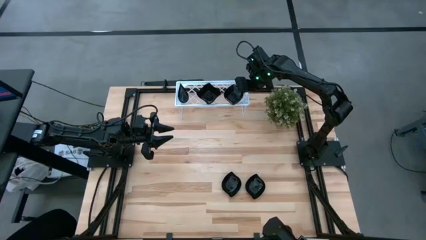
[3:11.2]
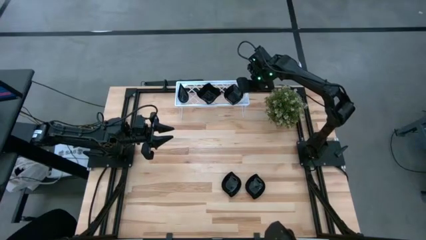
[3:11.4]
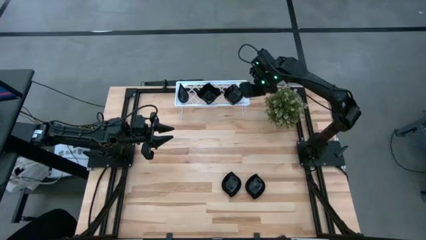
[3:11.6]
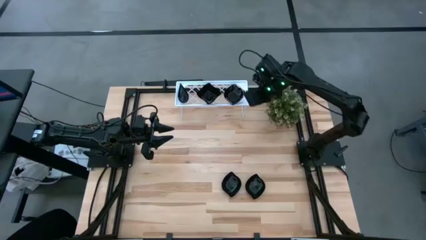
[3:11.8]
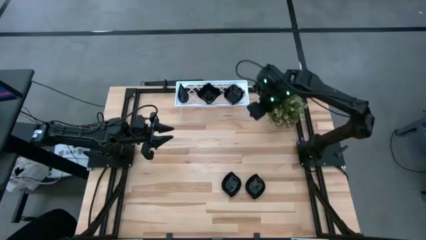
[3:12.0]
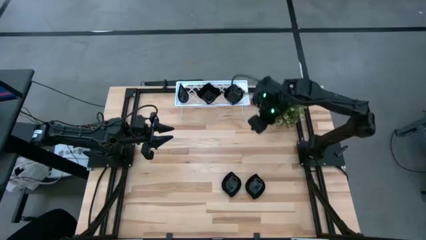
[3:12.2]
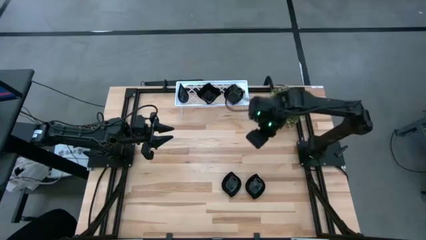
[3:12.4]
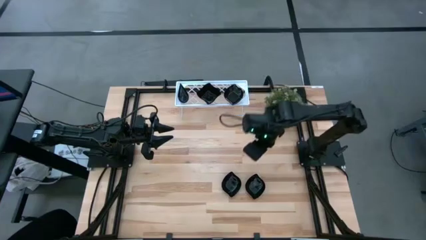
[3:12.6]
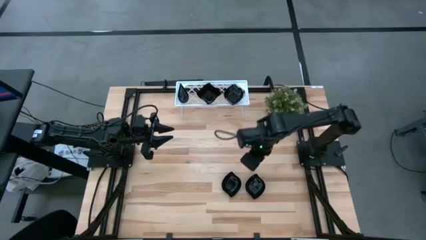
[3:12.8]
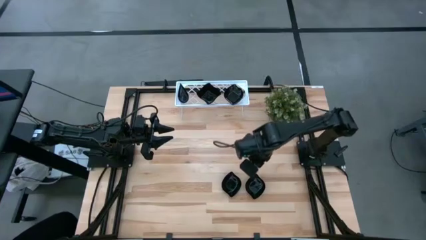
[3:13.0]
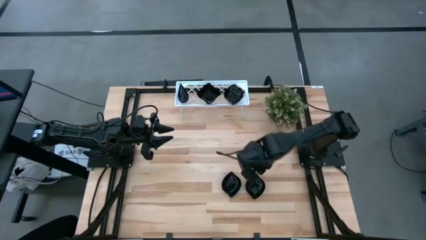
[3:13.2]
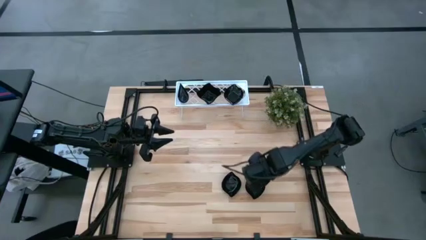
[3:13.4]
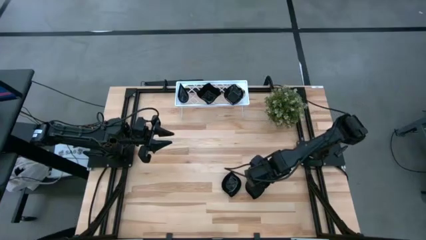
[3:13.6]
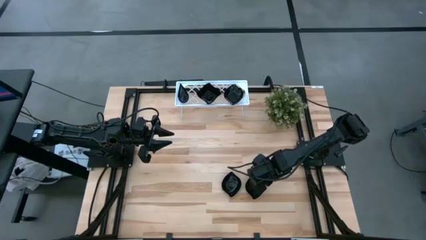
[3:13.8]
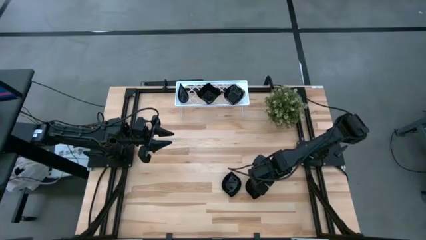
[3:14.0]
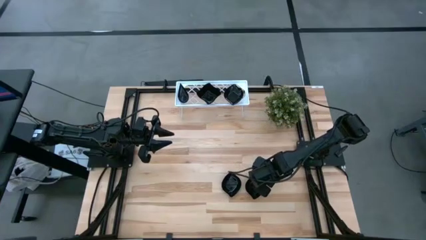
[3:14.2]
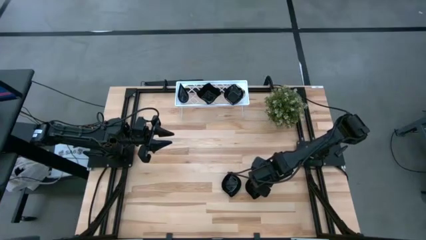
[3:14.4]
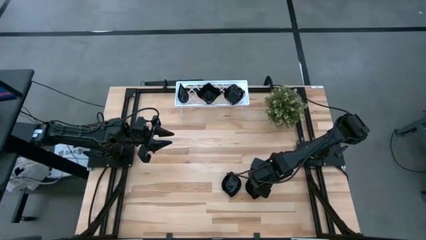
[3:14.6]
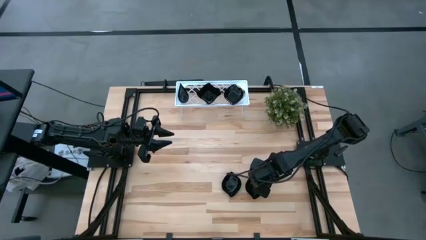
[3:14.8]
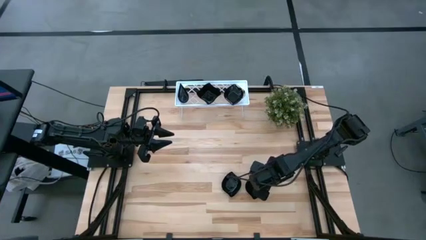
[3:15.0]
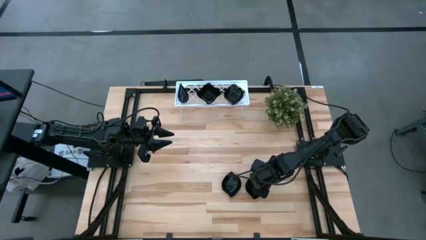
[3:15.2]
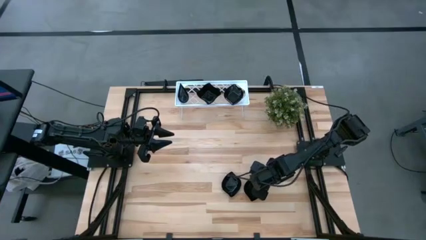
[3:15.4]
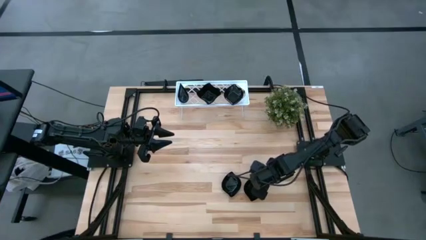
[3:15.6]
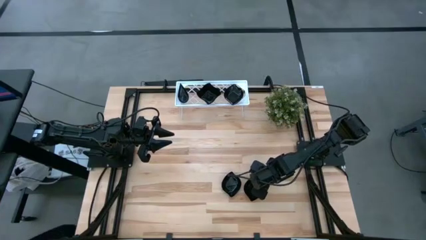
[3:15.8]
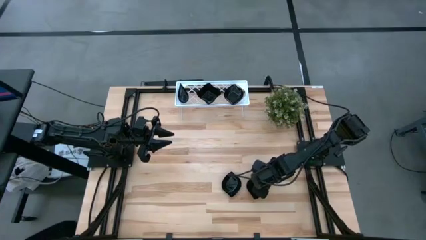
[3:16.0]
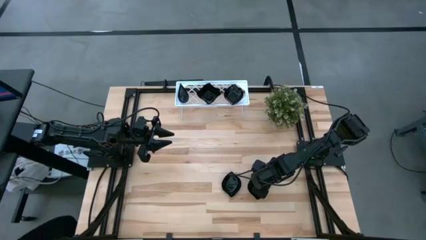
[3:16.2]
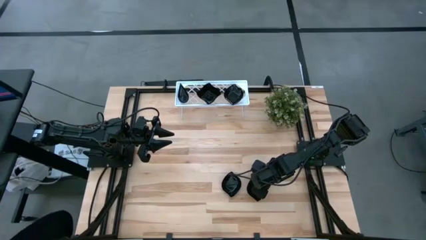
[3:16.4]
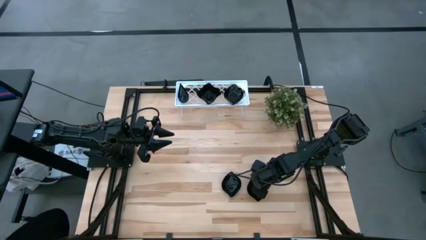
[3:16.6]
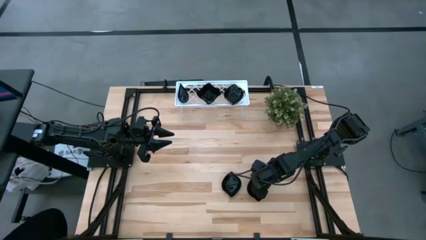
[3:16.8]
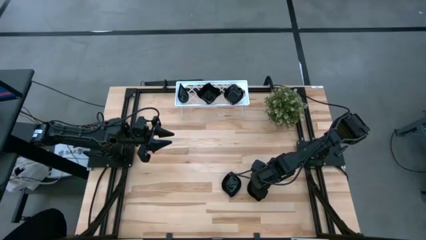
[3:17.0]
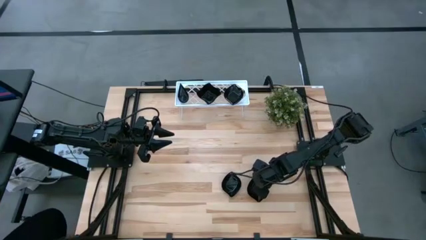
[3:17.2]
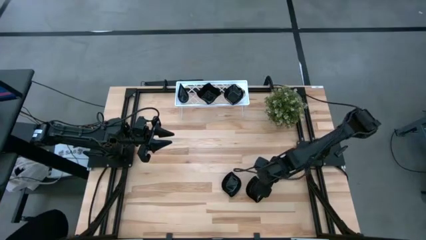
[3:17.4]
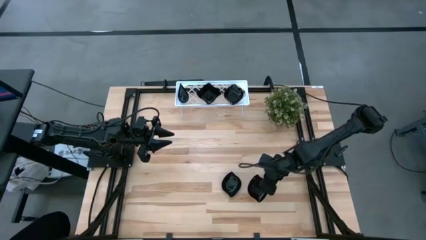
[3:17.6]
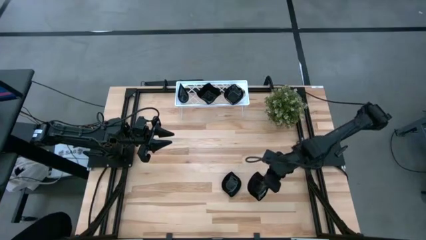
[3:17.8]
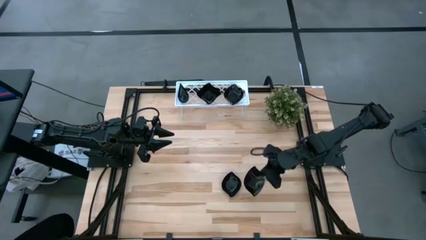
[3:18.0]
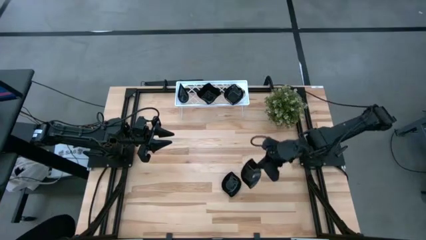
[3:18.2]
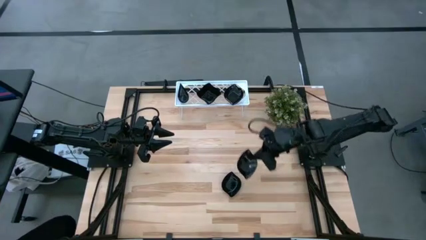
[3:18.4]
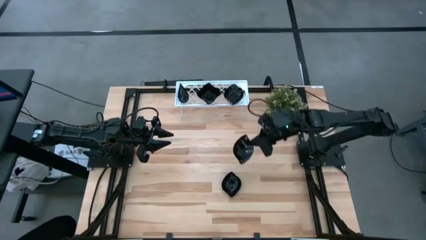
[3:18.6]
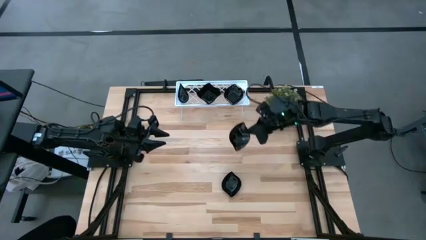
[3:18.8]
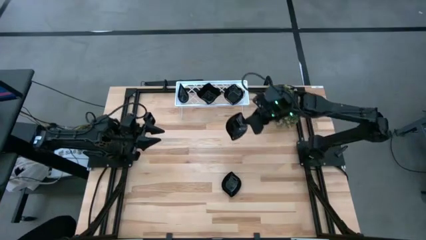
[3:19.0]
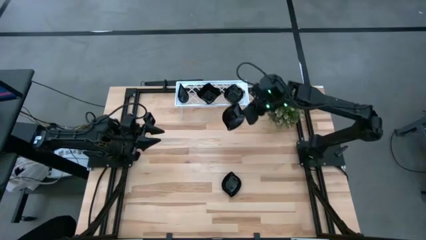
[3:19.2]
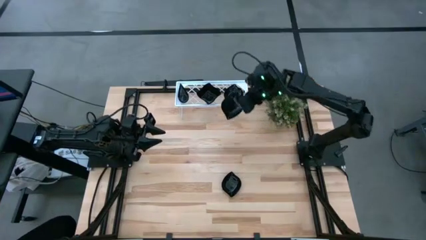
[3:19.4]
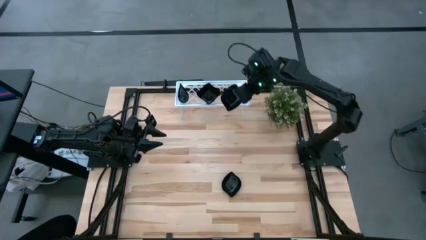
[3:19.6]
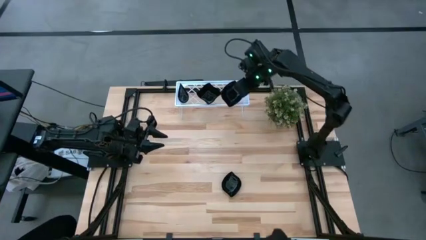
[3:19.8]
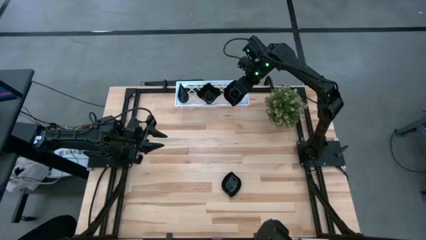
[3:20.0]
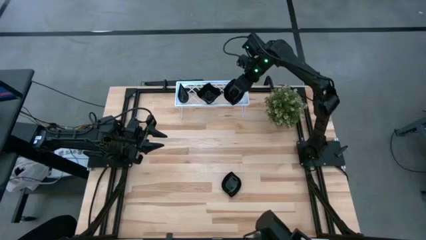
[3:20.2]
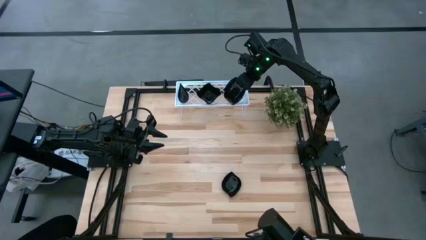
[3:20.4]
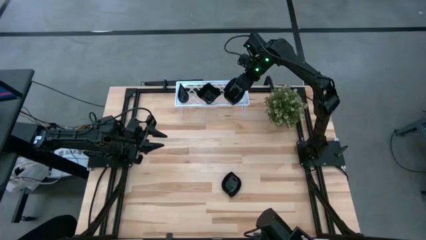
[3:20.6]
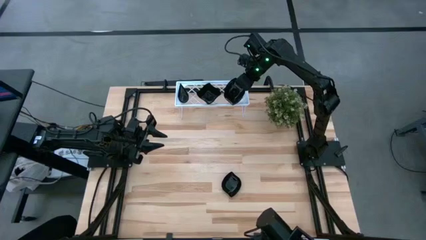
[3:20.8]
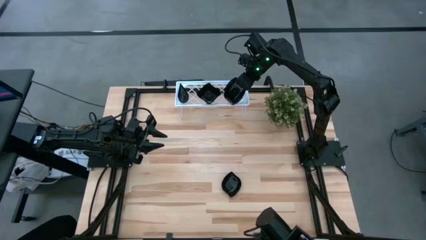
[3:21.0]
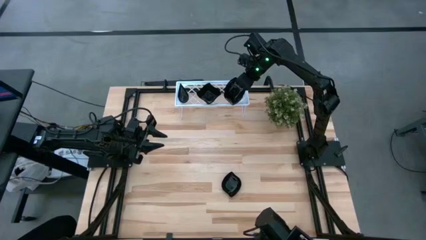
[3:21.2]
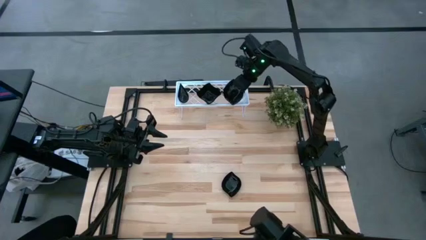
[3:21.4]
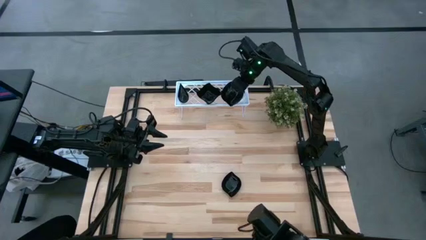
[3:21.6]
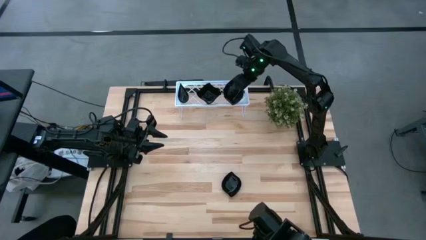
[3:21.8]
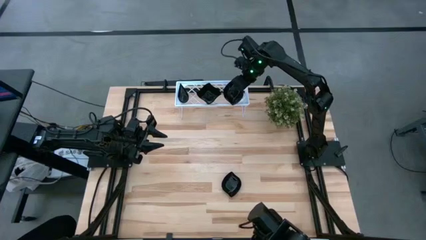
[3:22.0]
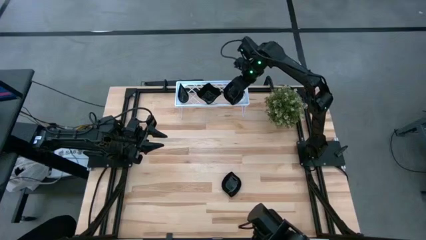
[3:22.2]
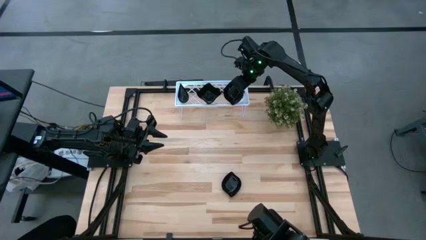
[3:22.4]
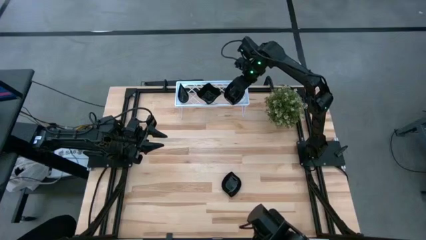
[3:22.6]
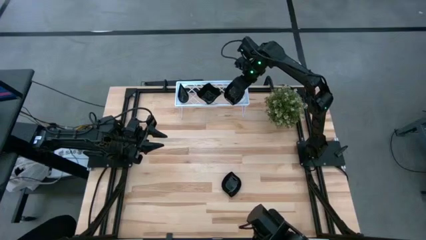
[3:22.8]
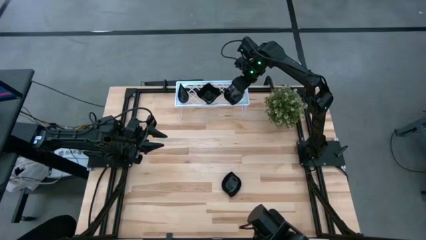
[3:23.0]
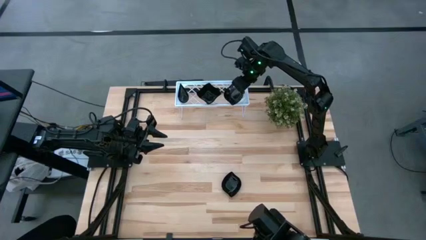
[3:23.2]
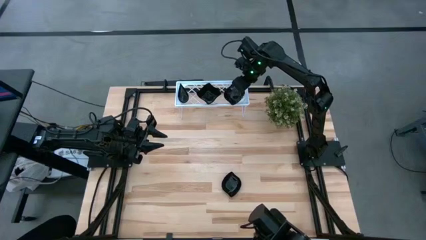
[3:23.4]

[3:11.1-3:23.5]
Task: Pick & Place Mini shaped plates
Stack the leaf-shaped plate on top of the leaf-shaped plate on the shelf

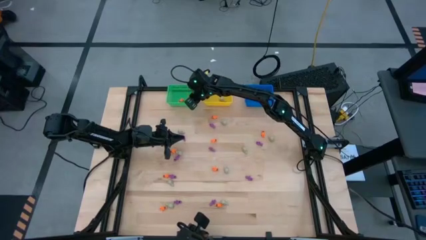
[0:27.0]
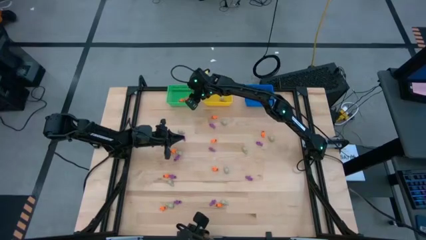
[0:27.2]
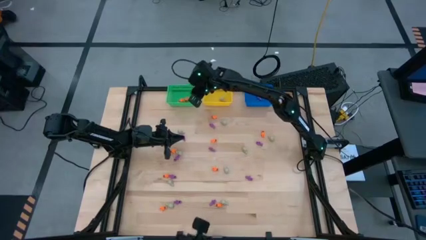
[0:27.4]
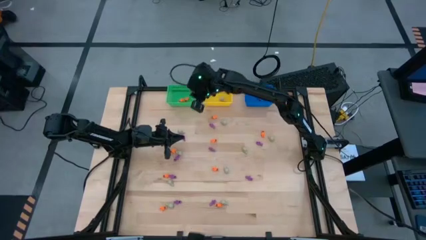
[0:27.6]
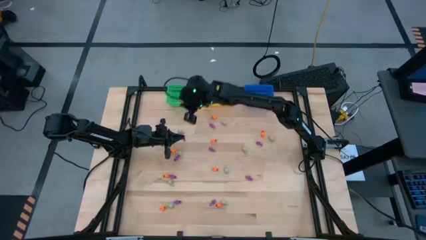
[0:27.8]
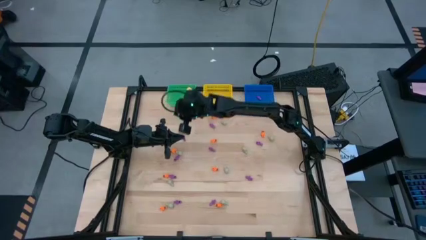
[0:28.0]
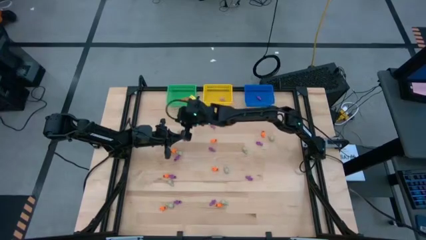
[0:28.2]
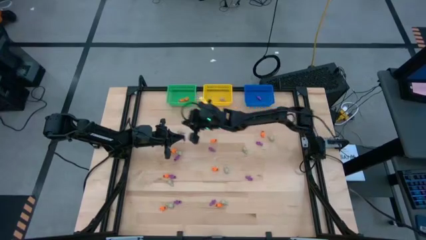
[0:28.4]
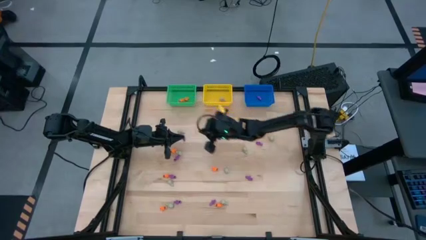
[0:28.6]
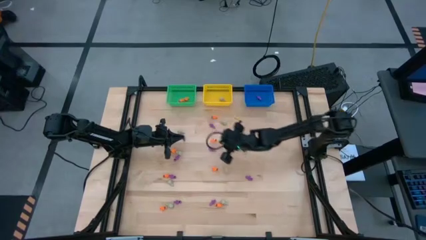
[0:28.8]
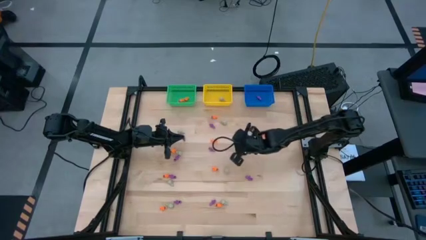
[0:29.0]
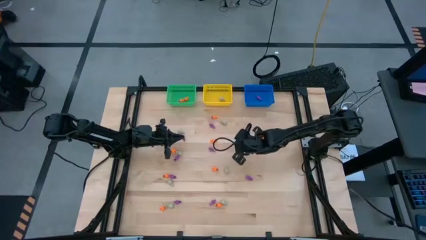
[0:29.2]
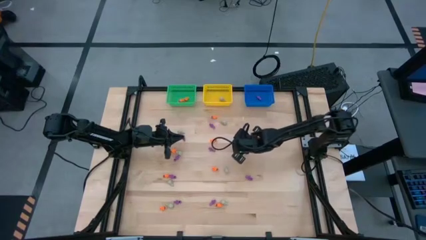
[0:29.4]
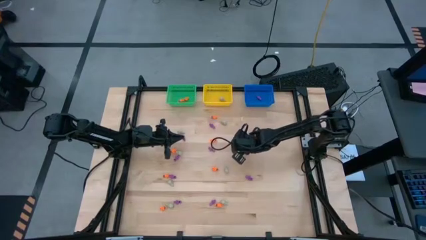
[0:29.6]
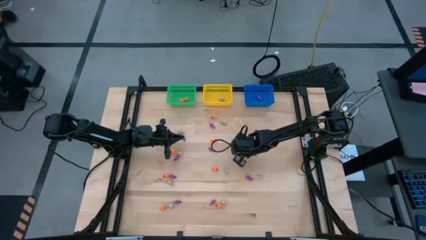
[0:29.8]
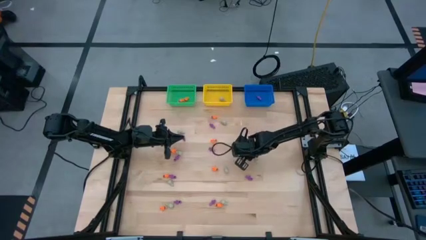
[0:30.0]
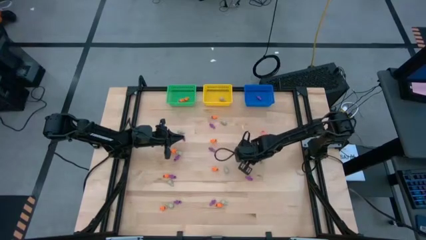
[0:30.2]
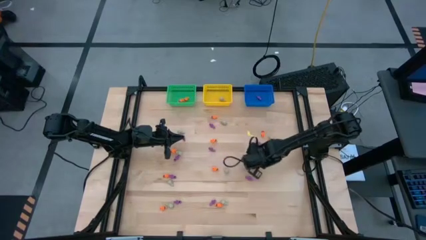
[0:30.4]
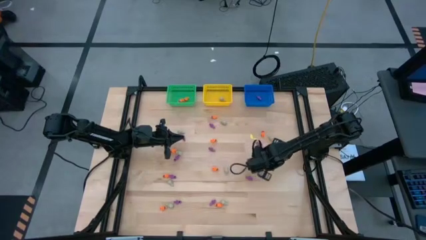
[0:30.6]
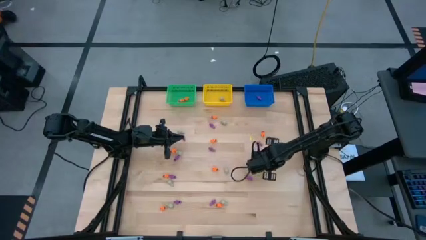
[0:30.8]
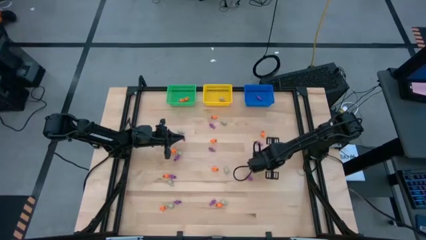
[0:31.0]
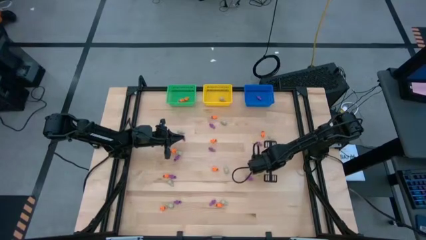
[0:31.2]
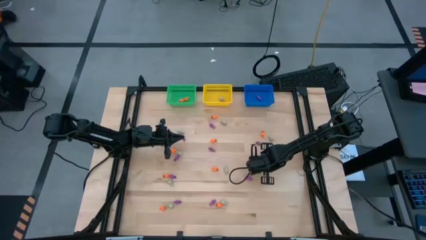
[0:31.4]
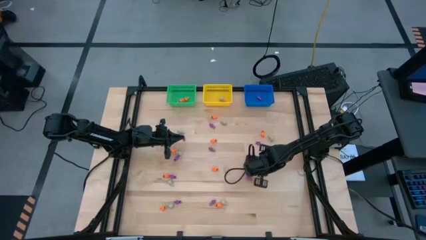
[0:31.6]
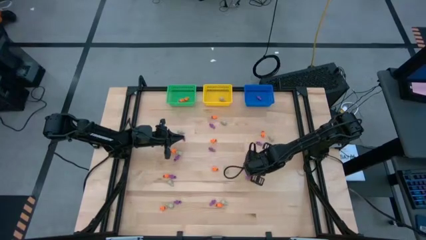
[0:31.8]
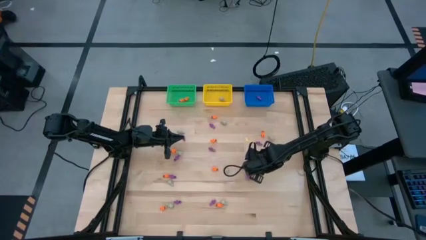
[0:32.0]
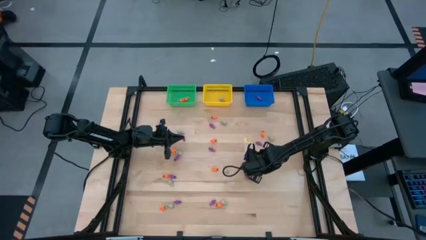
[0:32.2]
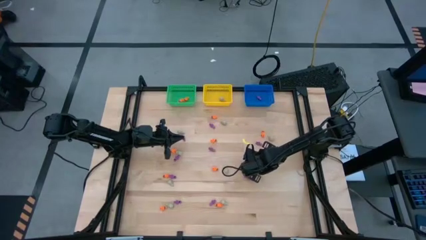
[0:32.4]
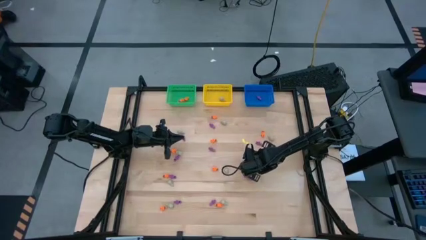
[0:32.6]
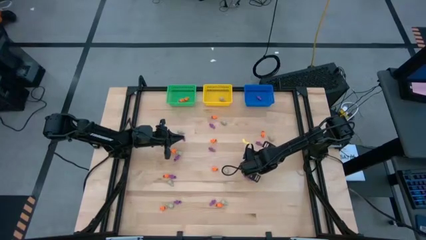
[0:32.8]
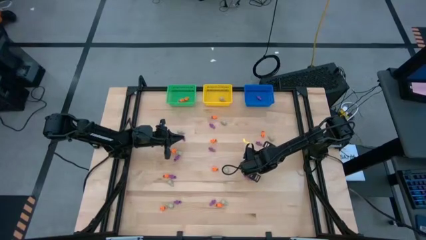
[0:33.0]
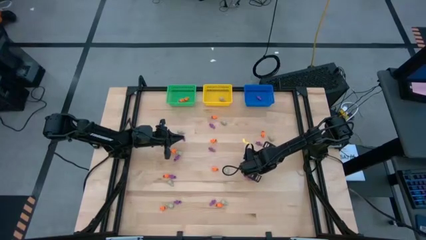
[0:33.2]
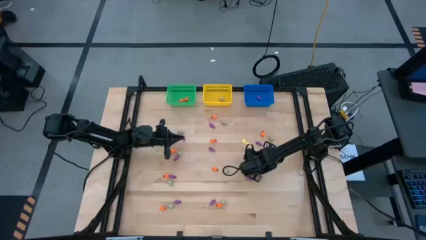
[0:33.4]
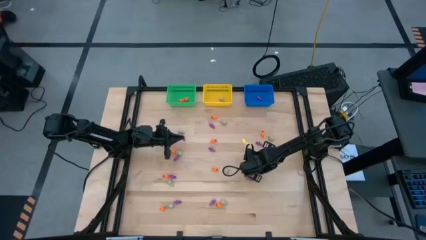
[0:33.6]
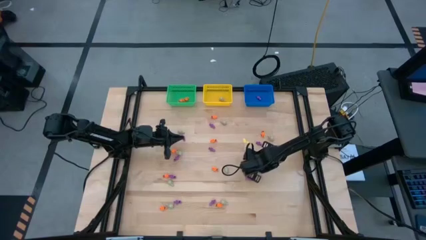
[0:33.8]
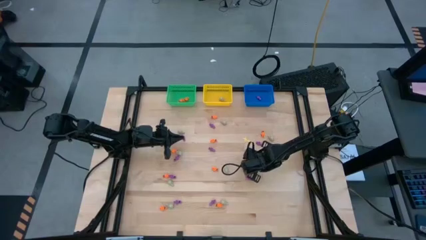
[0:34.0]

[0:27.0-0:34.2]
Task: Sort Halloween decoration
Put the white skull toy into the yellow bin
